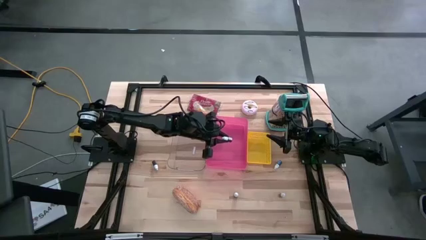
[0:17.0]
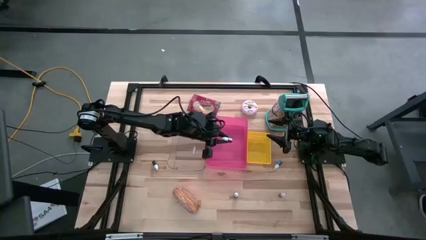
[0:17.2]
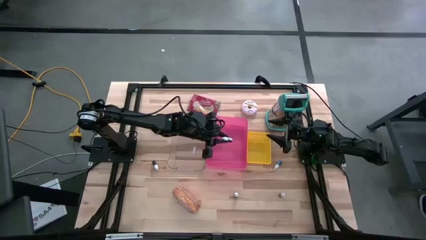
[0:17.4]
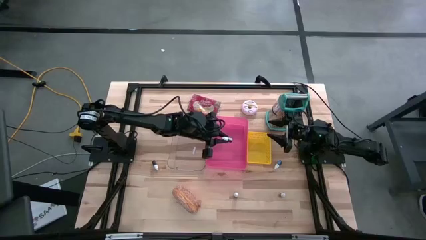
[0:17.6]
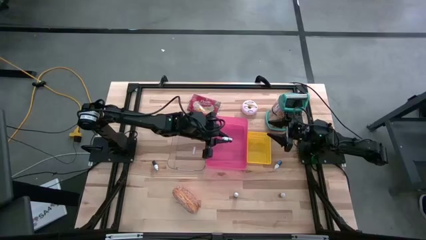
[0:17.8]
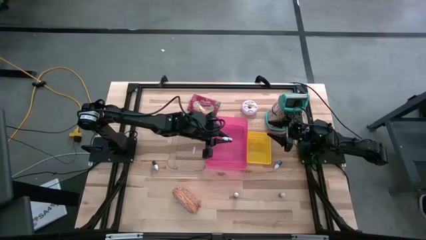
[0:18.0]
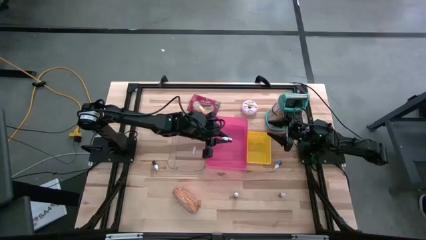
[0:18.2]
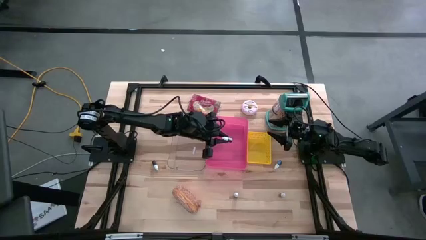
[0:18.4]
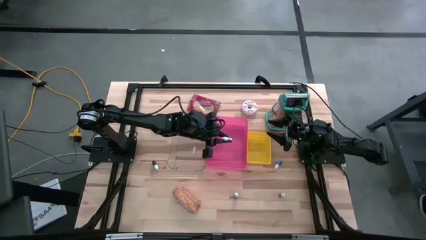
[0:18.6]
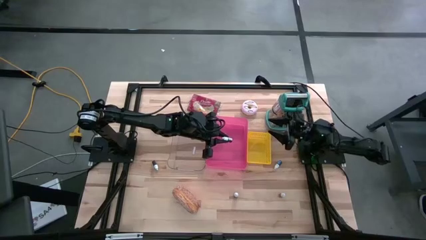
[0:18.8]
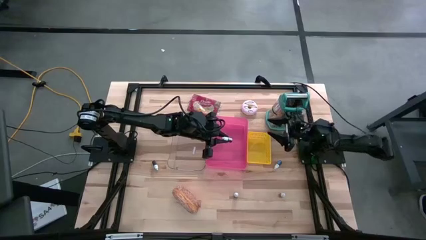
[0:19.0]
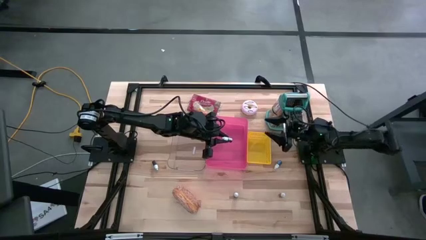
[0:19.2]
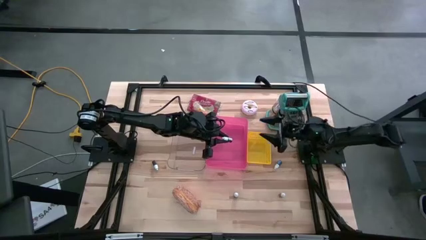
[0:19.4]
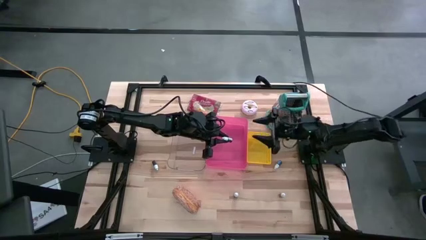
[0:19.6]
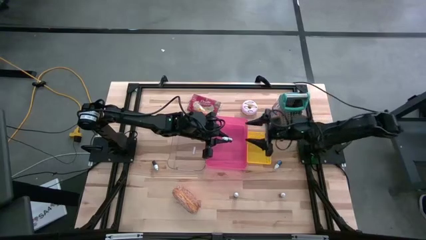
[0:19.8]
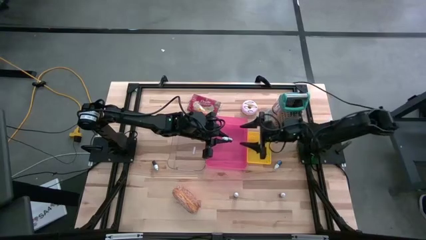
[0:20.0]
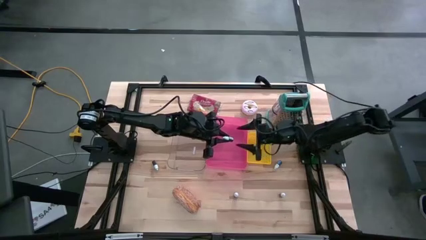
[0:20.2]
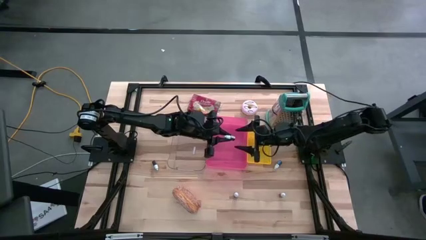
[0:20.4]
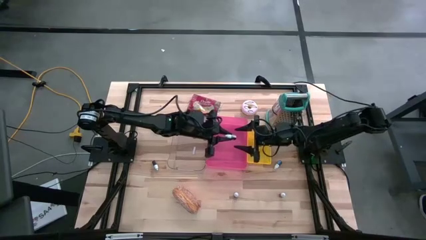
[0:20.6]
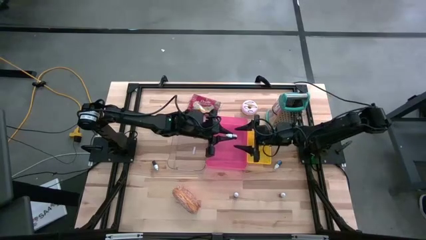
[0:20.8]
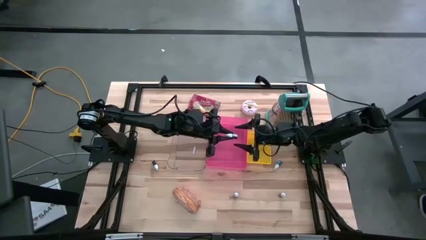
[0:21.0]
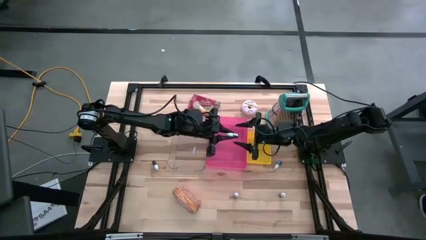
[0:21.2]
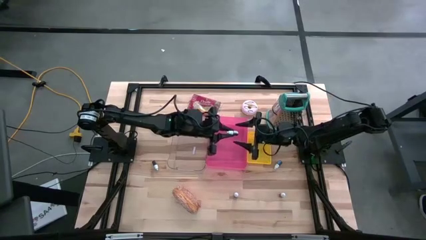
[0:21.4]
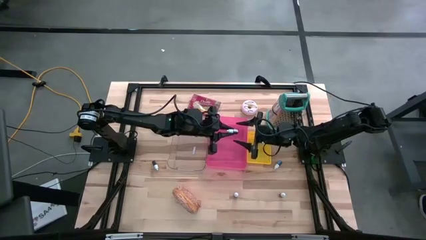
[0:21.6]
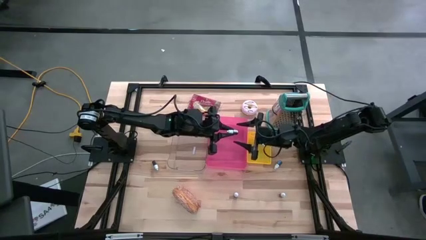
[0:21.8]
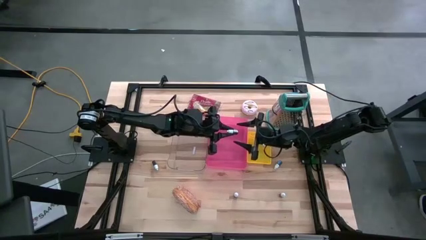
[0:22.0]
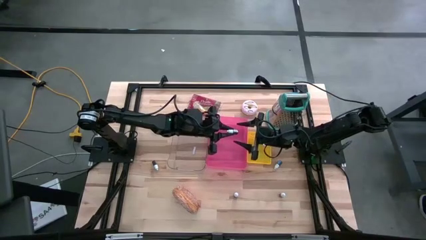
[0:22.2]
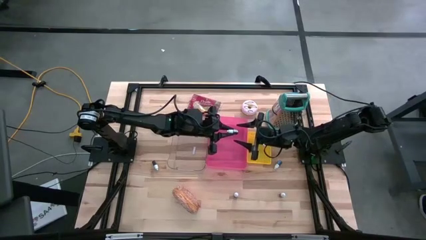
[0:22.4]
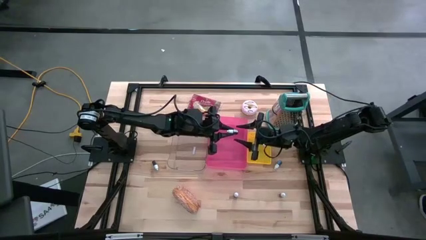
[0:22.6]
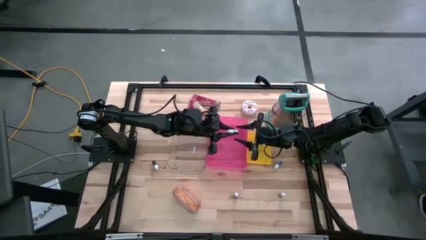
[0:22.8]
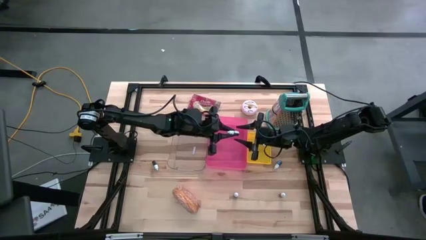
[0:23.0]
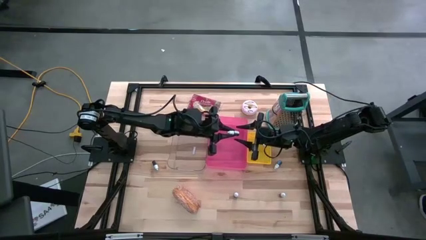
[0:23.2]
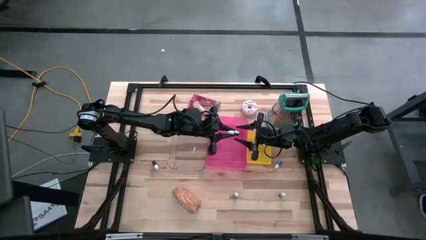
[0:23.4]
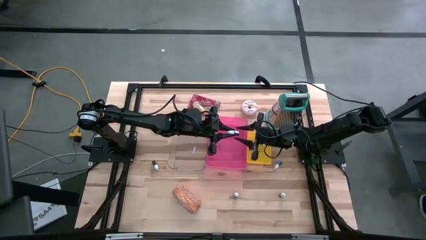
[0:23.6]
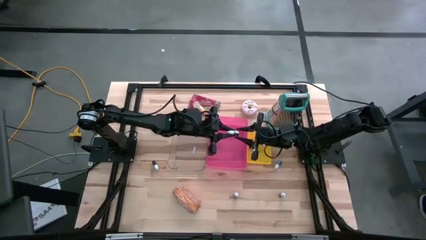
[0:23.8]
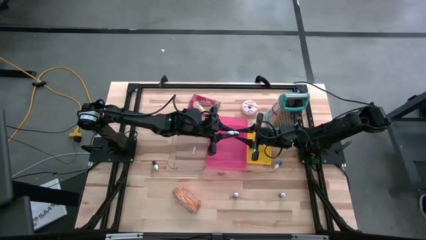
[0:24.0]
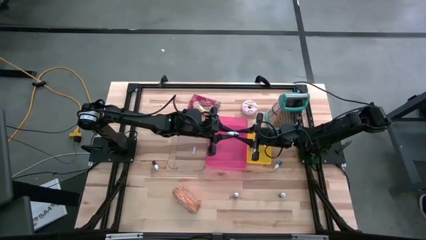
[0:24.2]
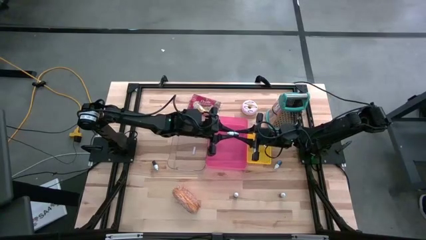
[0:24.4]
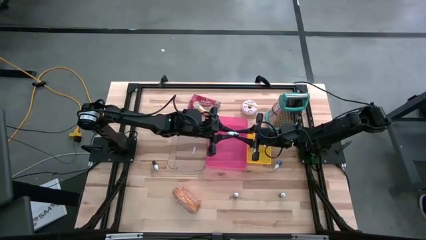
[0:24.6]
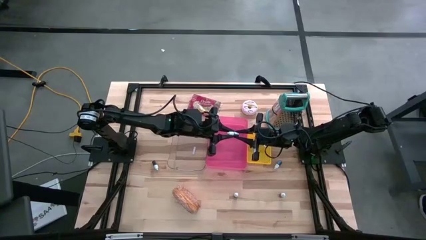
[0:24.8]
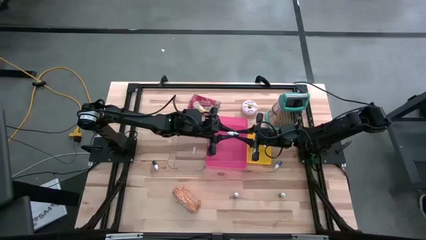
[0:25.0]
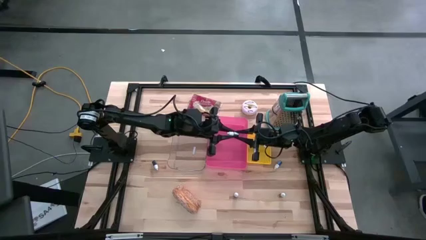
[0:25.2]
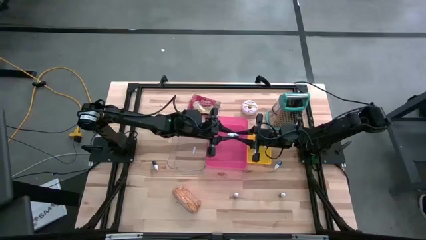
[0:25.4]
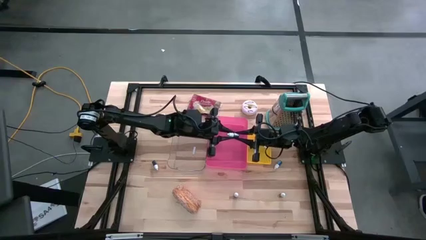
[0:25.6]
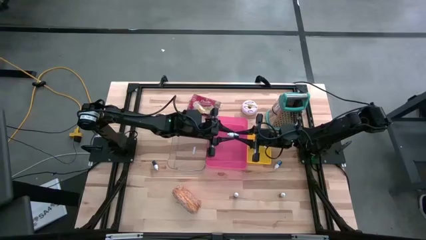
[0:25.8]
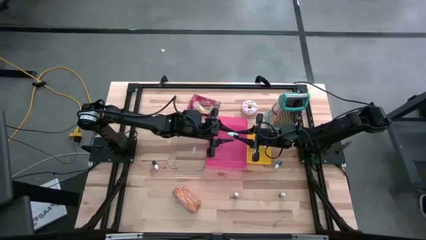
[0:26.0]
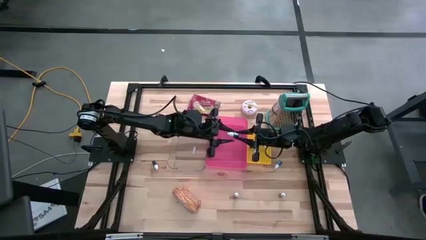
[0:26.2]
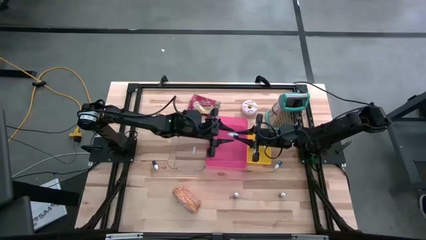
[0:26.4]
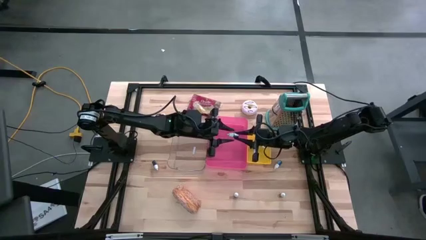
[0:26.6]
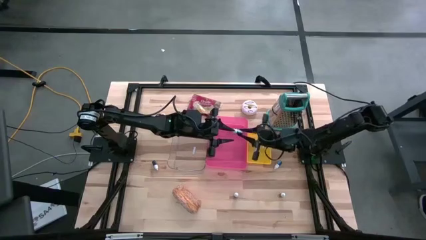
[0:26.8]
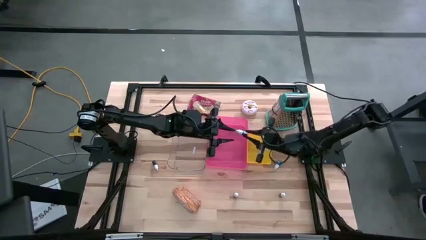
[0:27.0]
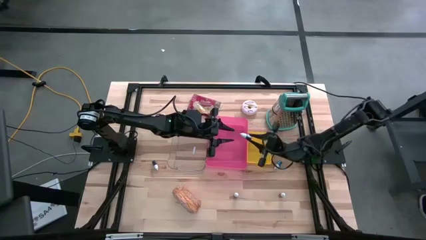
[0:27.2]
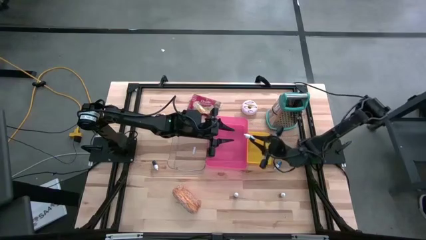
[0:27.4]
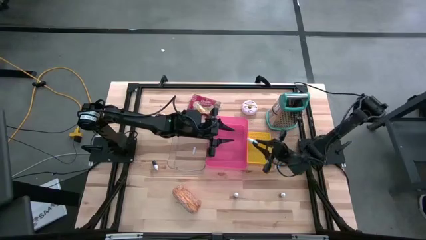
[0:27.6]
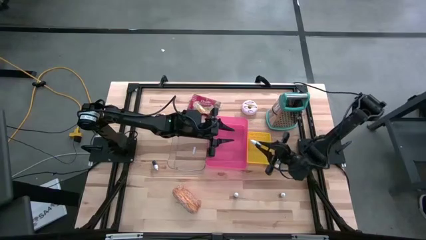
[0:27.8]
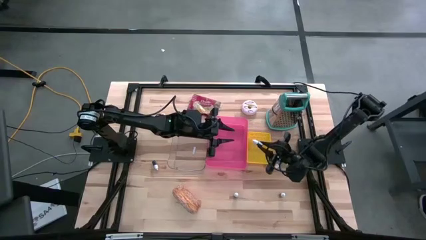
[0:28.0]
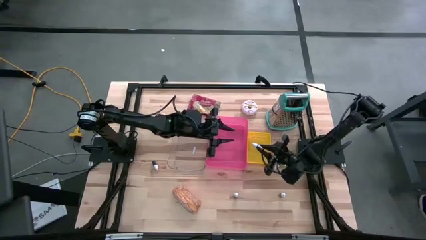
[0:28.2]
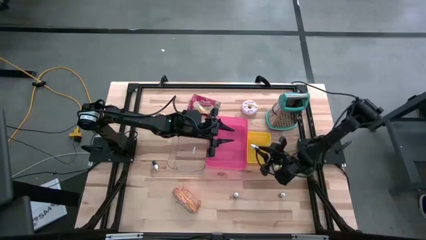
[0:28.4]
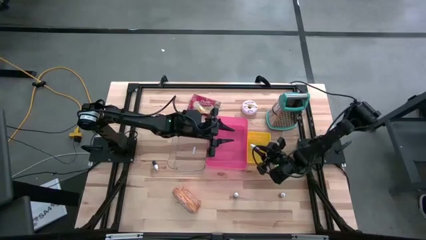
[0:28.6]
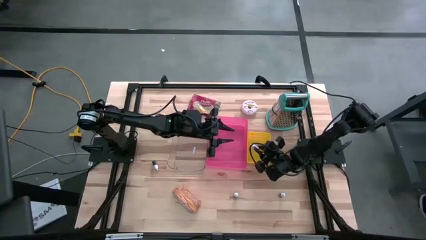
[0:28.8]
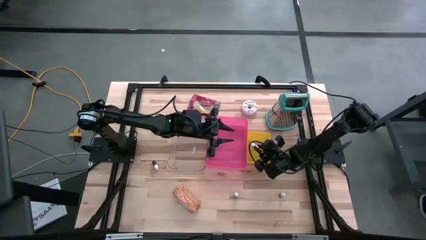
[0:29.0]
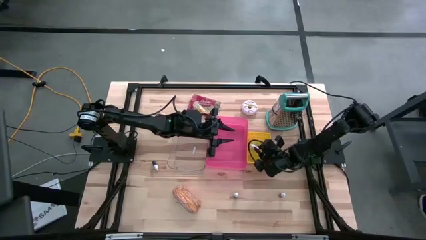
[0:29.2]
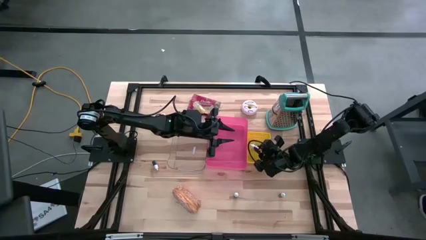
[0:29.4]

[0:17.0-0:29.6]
Put the bottom black food coloring bottle into the yellow bin
